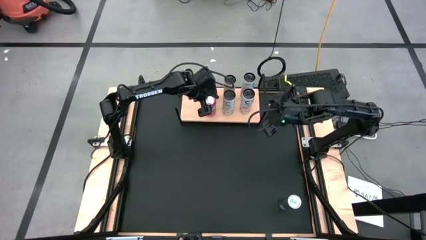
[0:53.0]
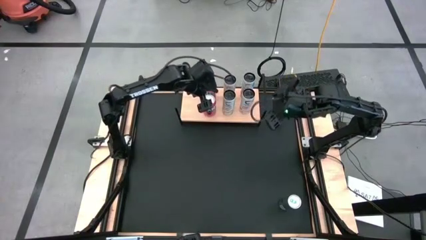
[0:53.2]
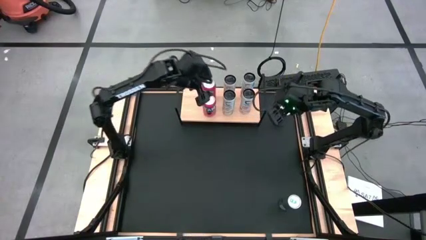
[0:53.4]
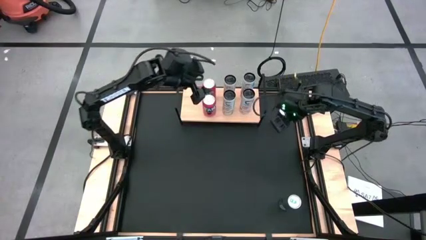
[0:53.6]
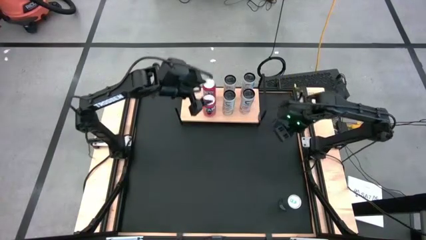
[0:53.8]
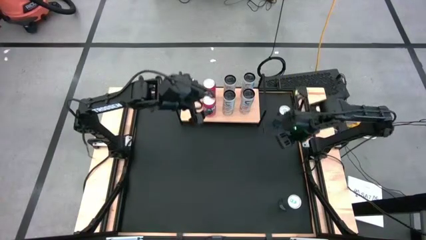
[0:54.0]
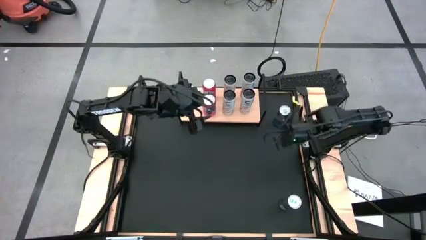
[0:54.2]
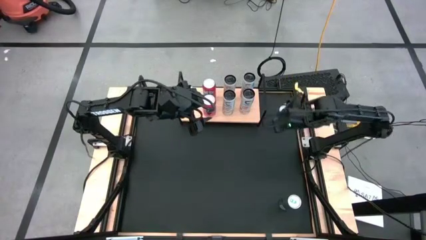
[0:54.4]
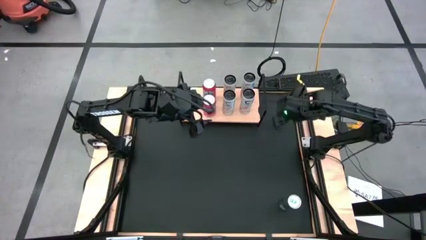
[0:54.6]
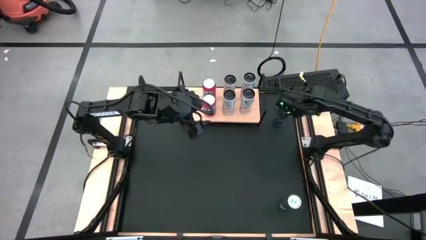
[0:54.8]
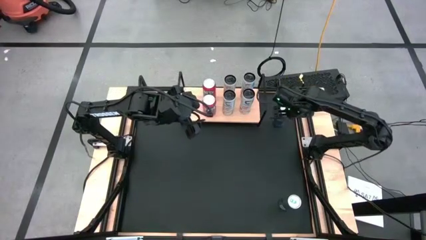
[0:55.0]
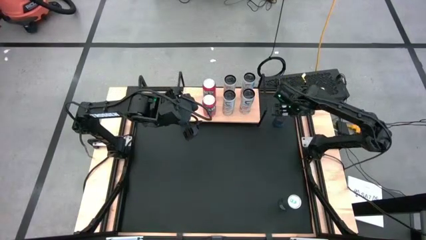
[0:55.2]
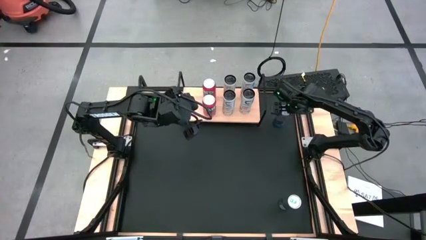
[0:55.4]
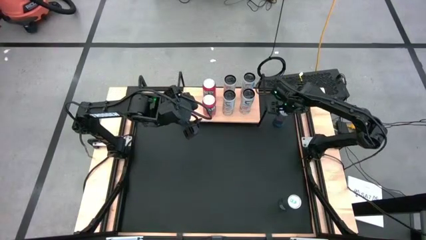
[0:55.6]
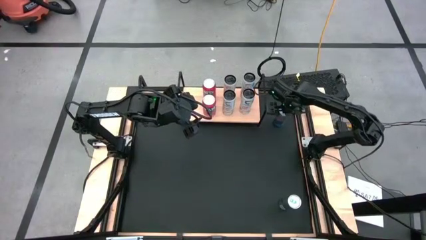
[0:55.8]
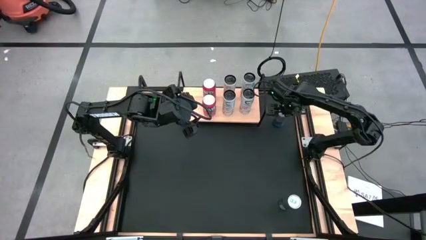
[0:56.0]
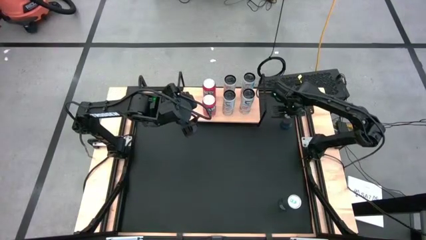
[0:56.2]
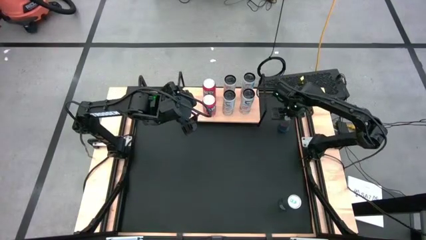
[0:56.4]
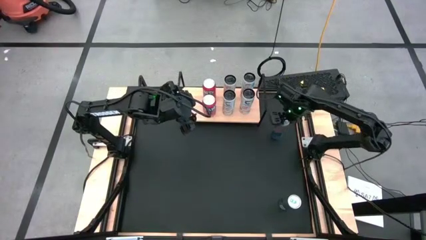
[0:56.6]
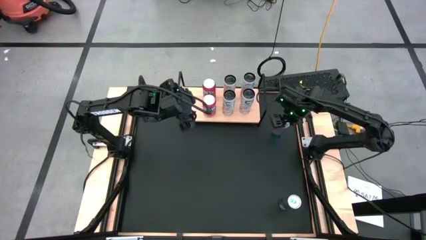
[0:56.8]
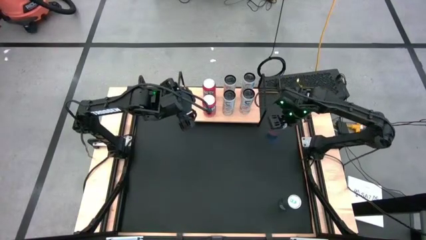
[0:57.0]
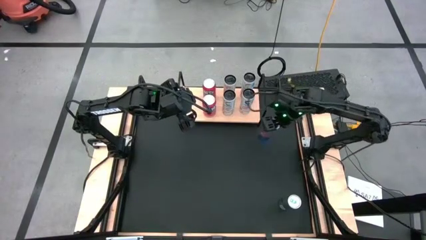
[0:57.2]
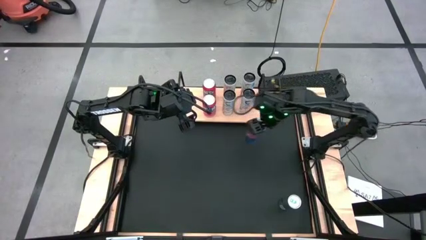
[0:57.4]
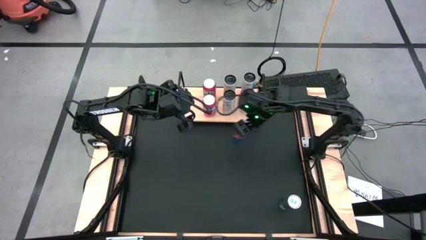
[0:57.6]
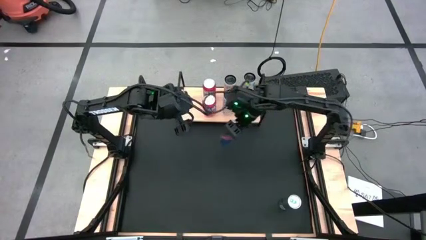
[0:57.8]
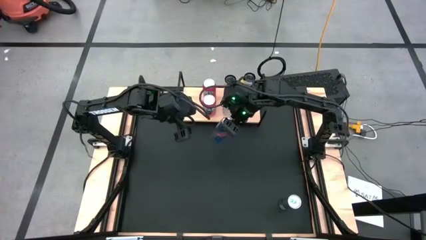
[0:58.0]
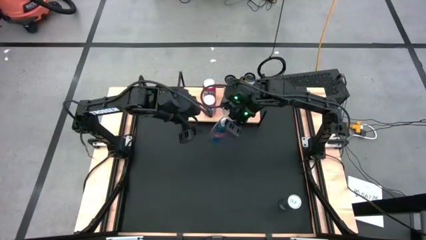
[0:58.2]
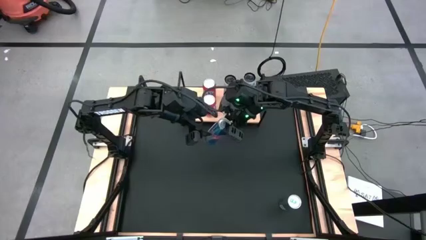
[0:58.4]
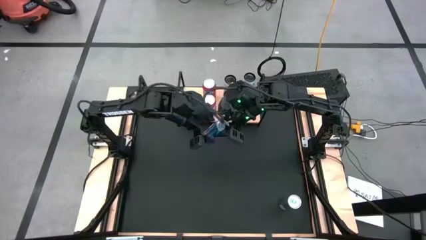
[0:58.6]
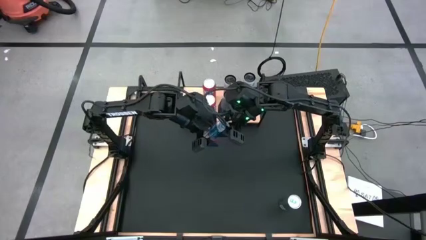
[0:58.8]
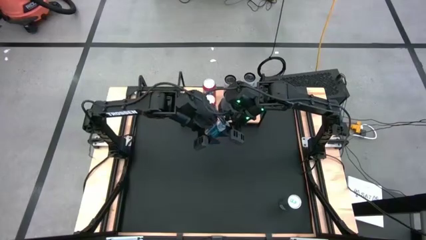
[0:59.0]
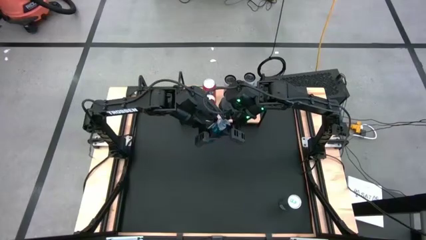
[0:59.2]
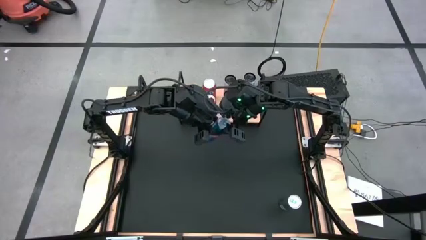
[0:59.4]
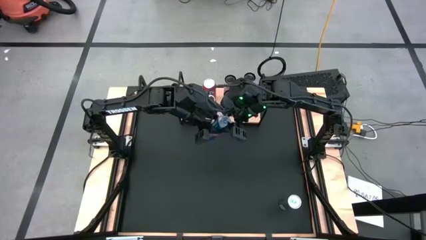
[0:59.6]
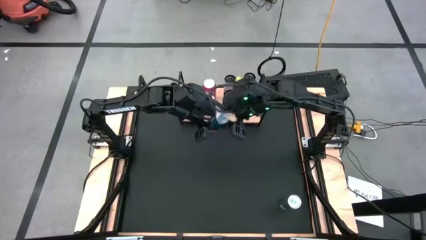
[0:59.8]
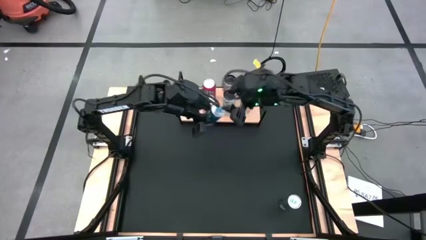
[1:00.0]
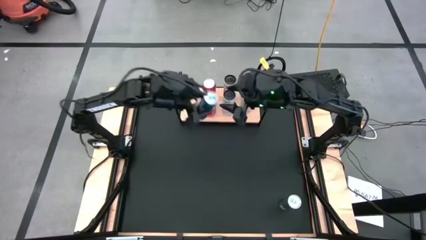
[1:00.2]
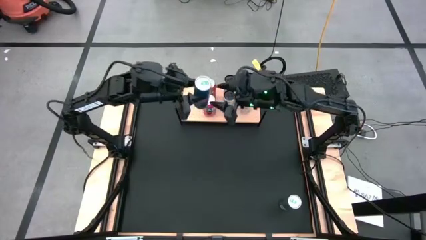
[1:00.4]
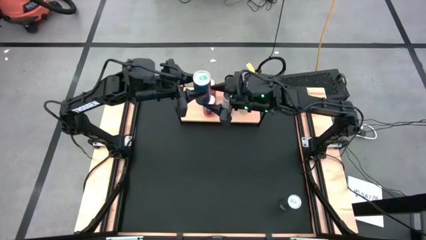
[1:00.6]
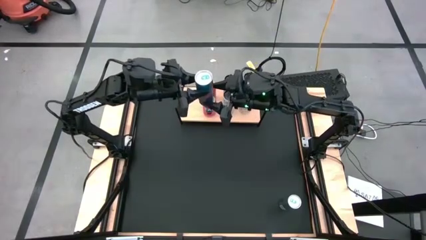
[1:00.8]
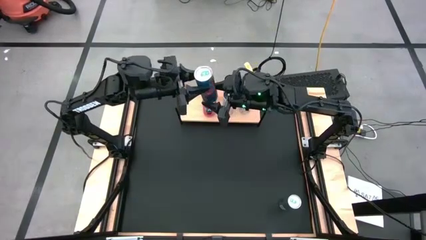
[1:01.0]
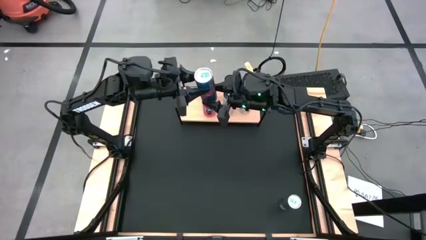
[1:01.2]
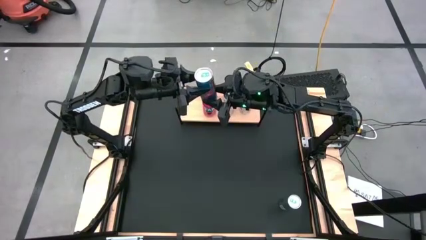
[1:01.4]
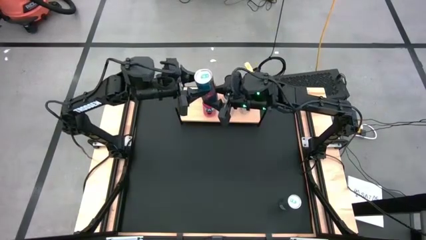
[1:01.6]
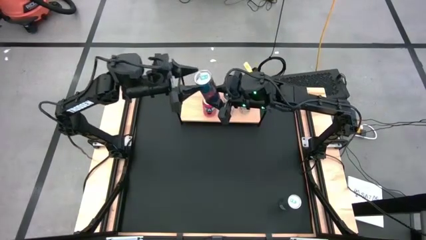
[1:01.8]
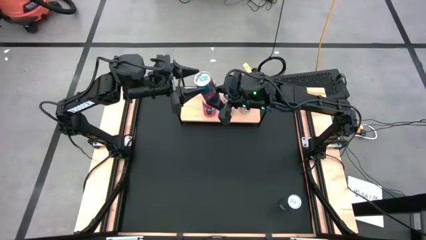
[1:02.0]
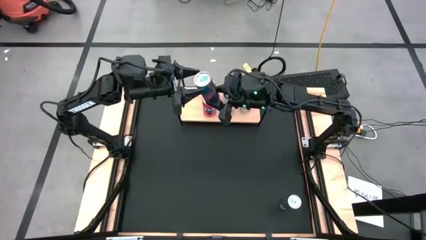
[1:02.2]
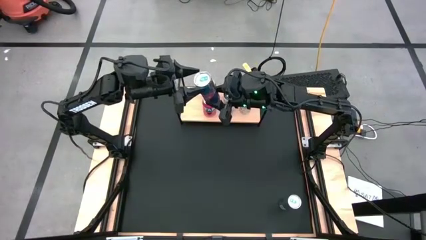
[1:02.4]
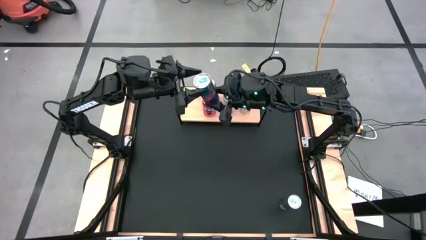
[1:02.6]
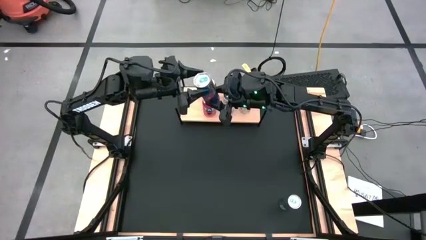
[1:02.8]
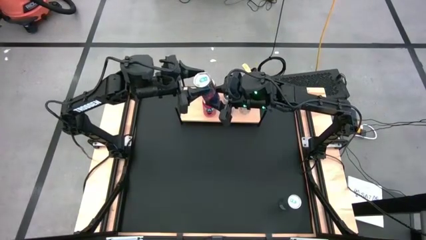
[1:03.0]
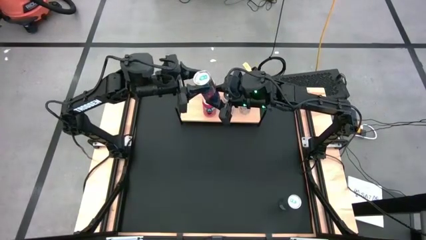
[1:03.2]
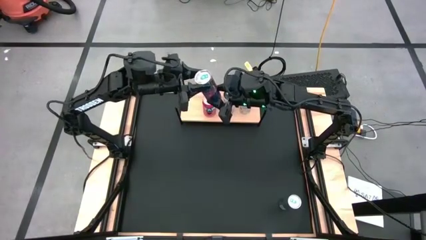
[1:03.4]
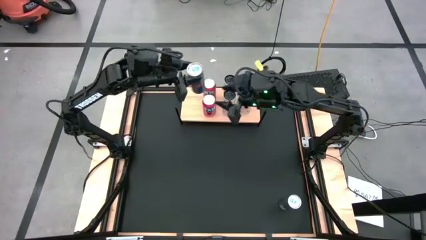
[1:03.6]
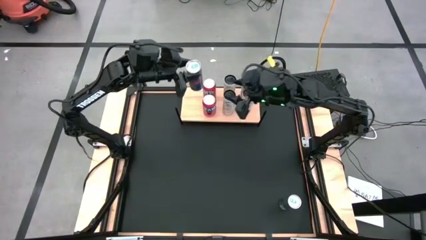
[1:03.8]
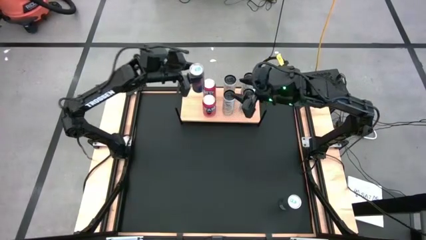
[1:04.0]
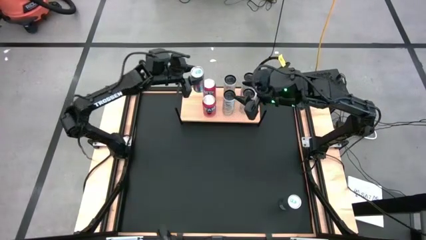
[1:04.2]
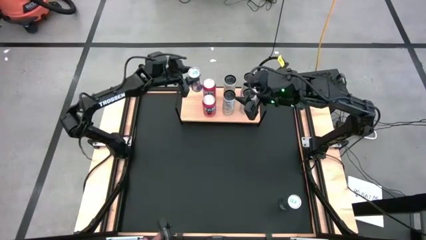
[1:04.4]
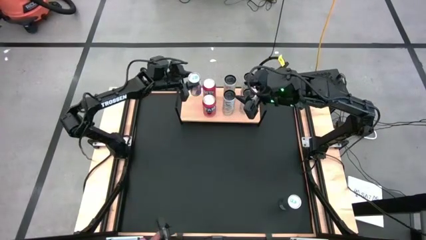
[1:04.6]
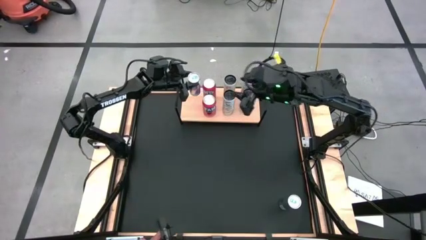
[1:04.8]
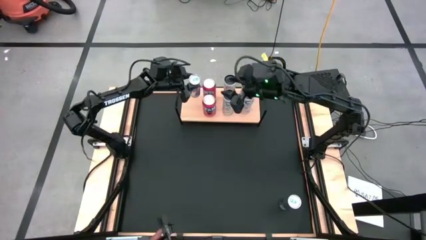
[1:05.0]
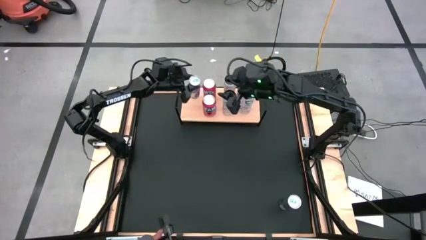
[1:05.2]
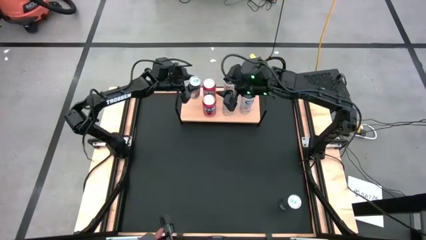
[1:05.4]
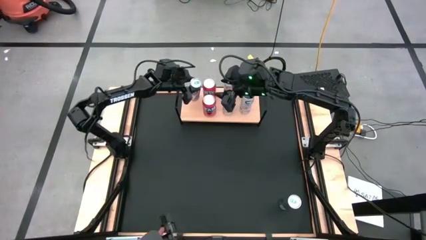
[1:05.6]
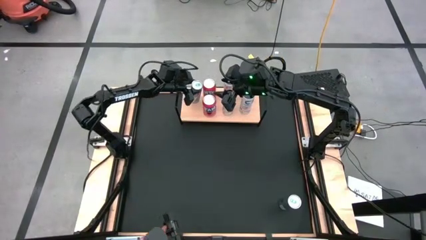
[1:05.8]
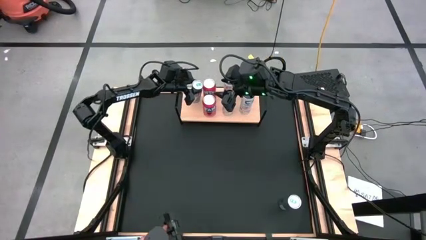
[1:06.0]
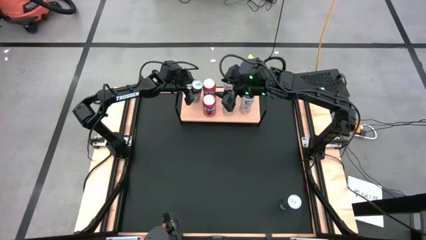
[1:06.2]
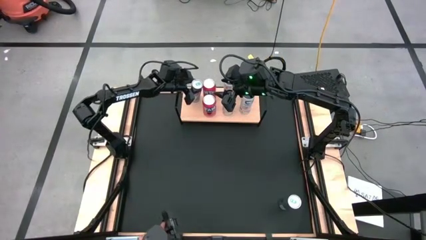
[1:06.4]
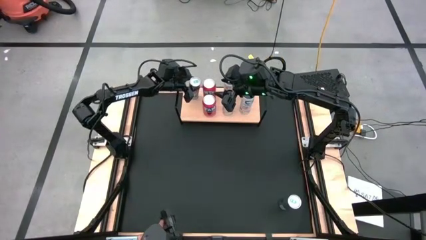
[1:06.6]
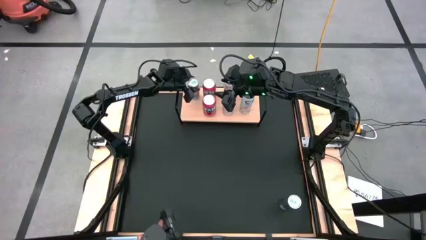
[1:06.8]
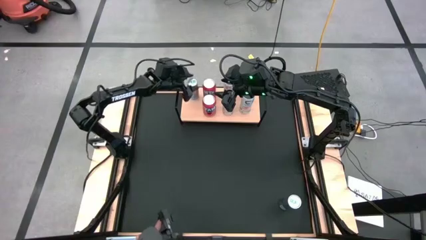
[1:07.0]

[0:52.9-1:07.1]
Task: Place canned beverage on shelf
Put the top blue soda can on the shelf
